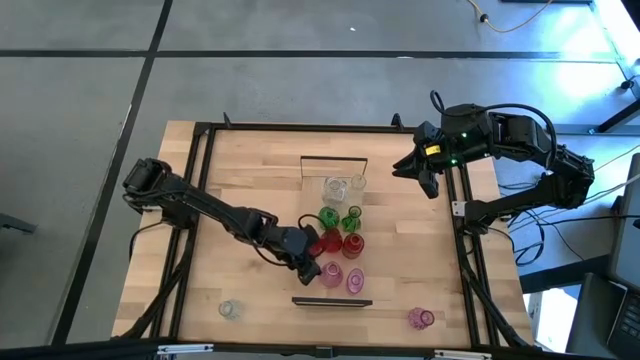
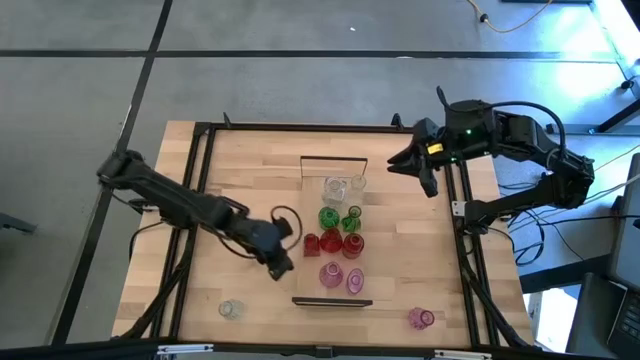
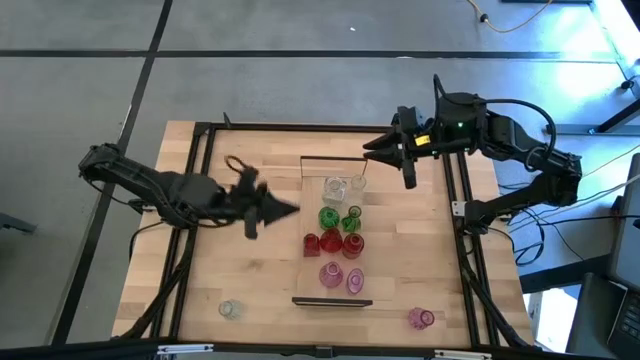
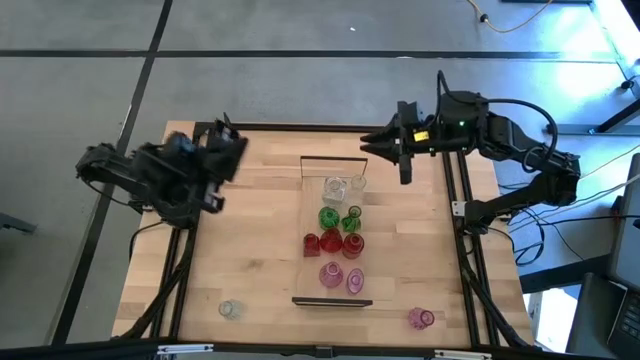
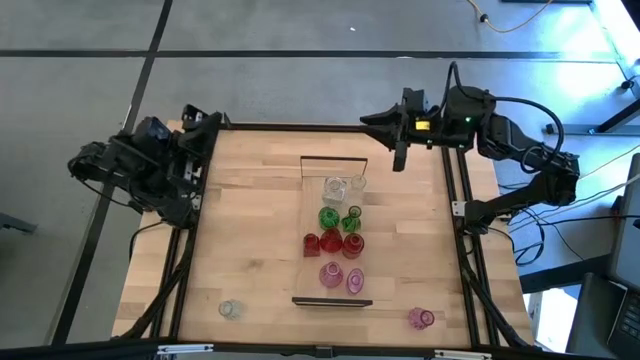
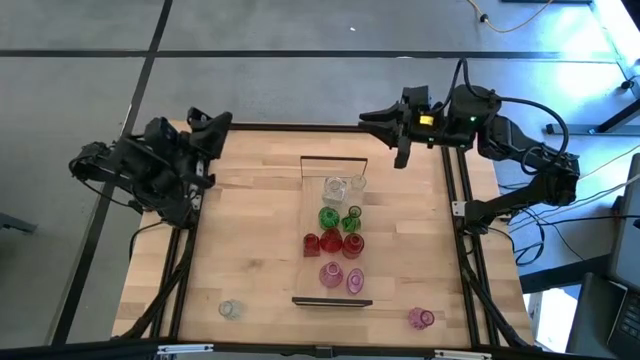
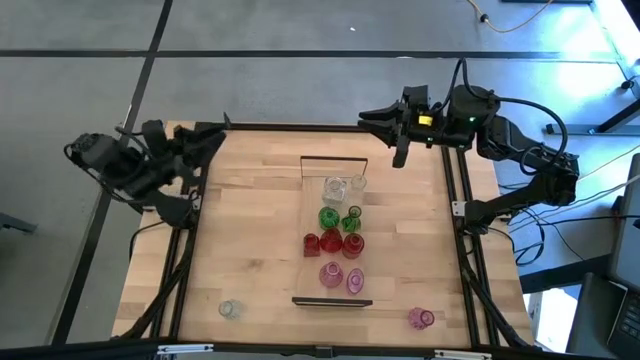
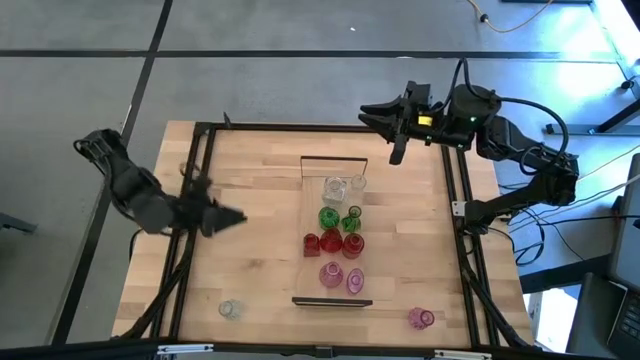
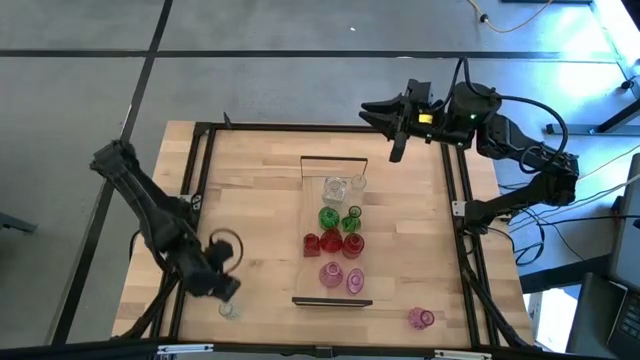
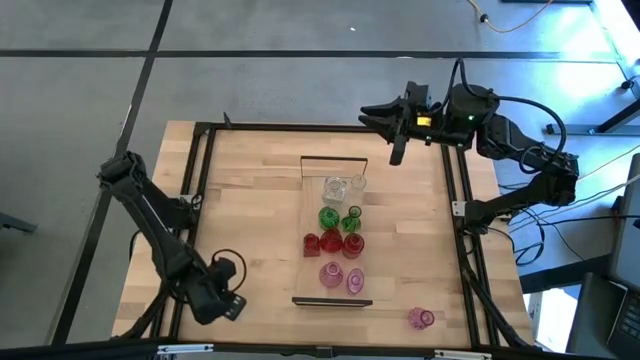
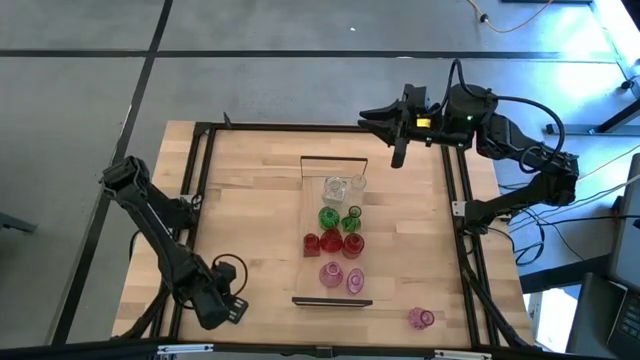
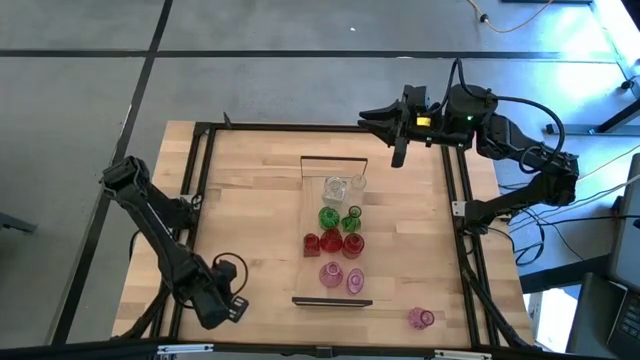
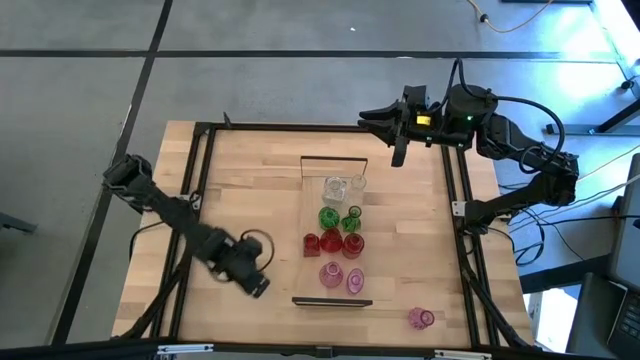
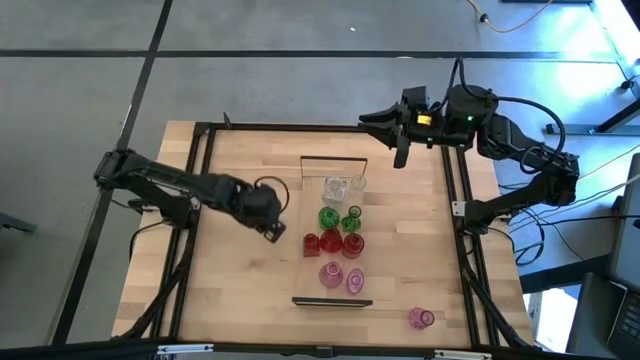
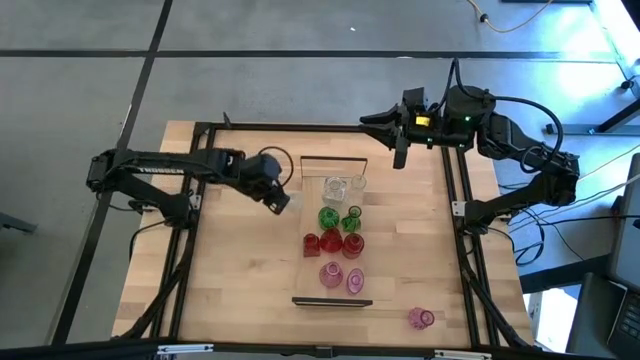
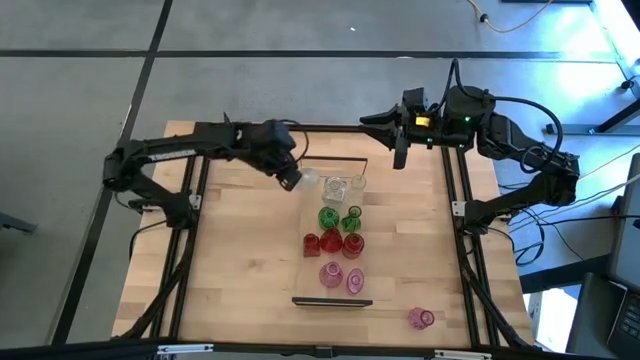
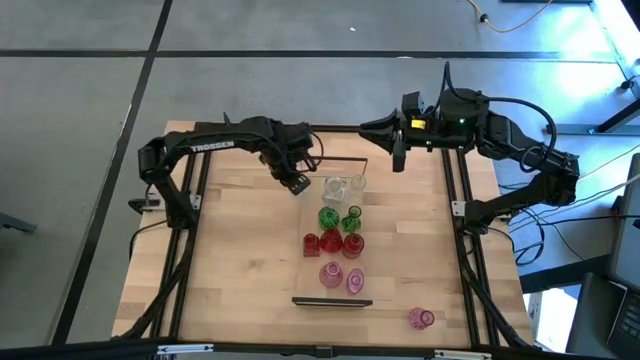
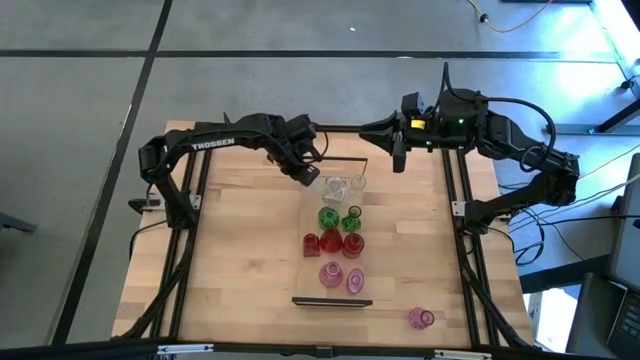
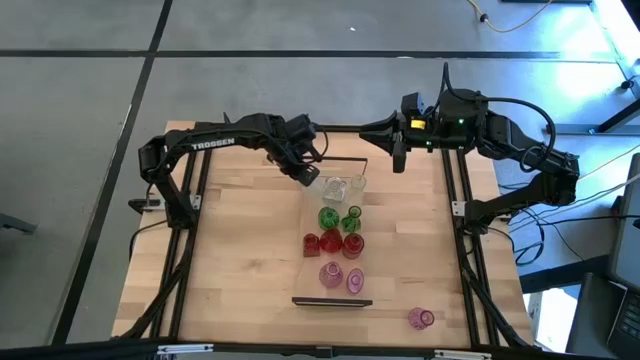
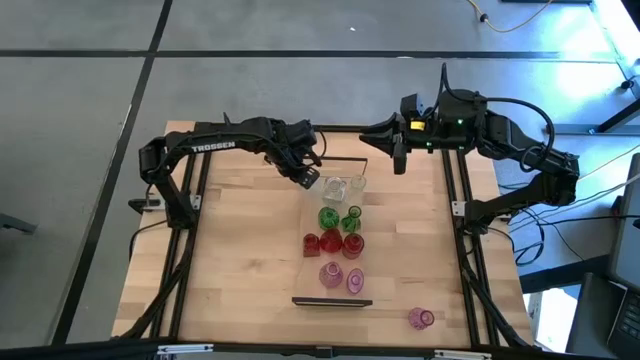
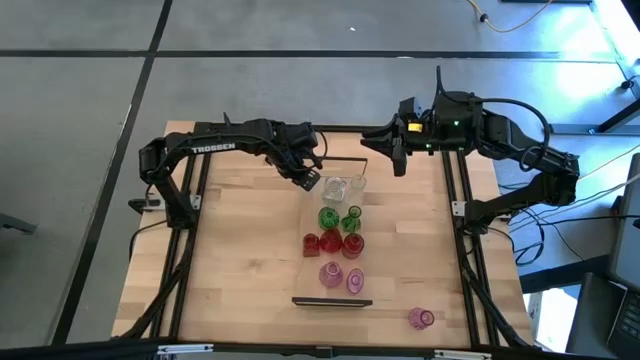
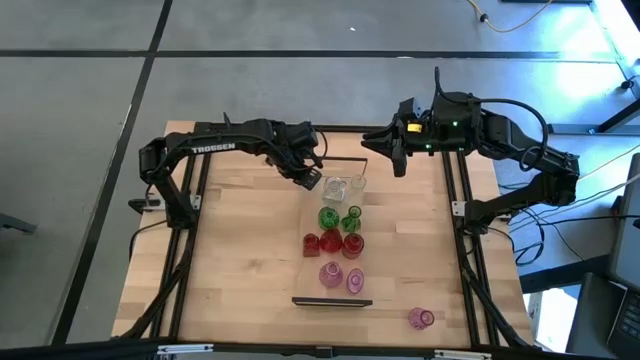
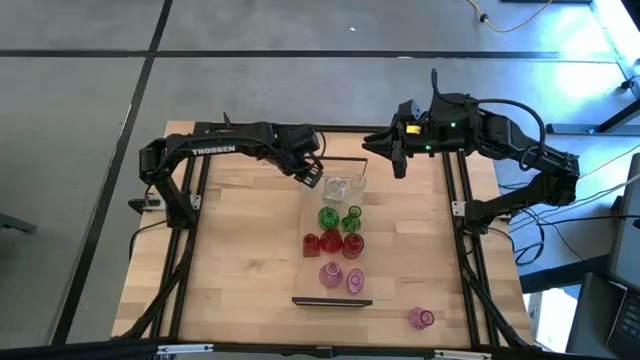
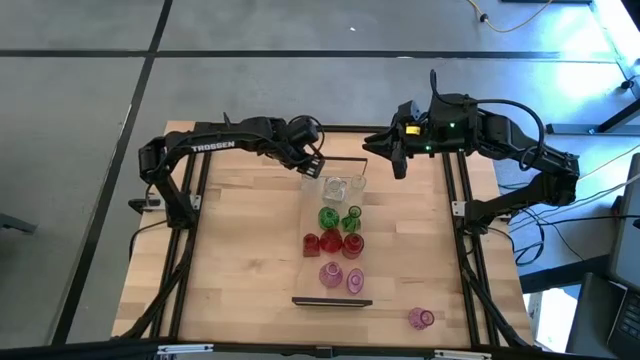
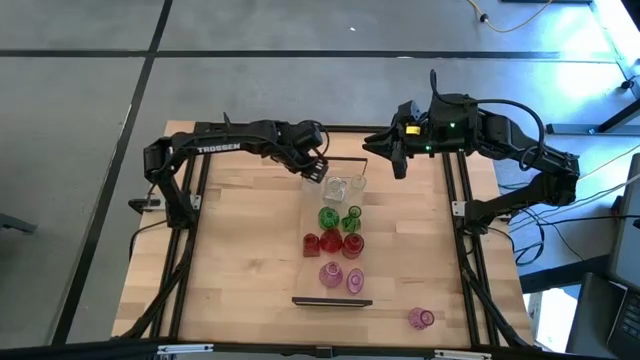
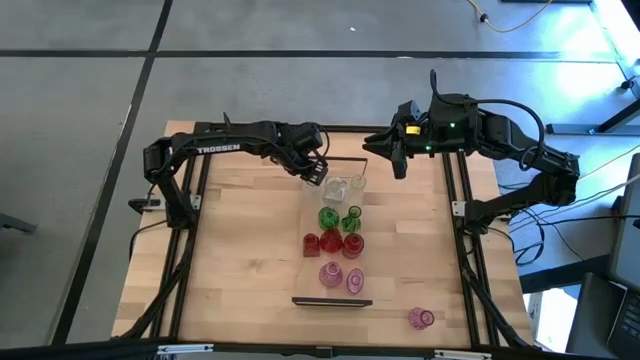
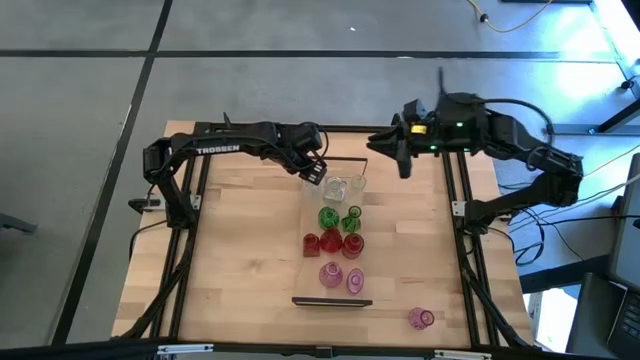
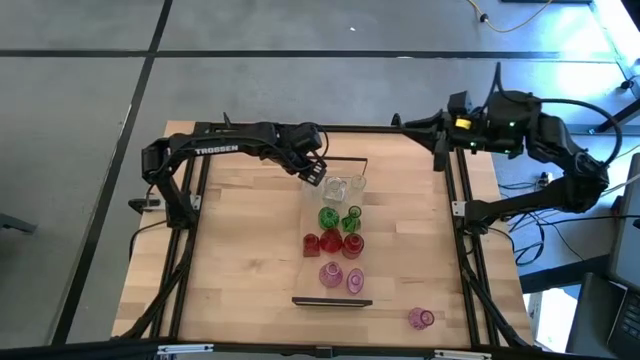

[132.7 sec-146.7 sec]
Task: sort vases onto shelf
Put the transparent vase aligned with the other transparent vases on the shelf

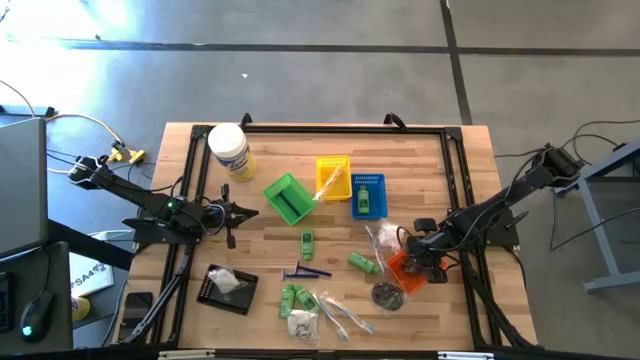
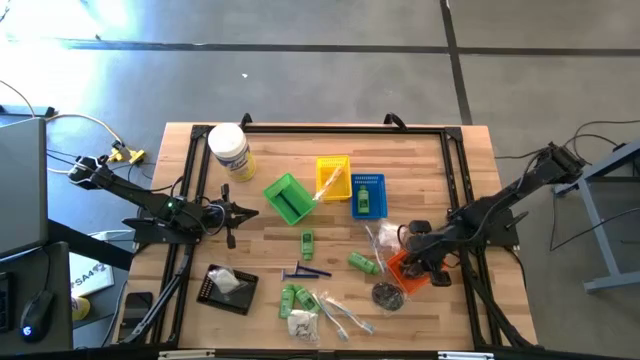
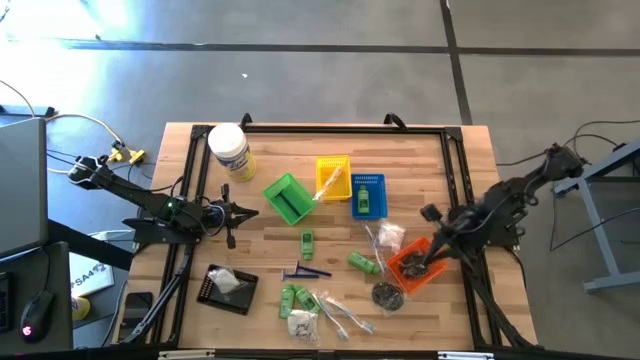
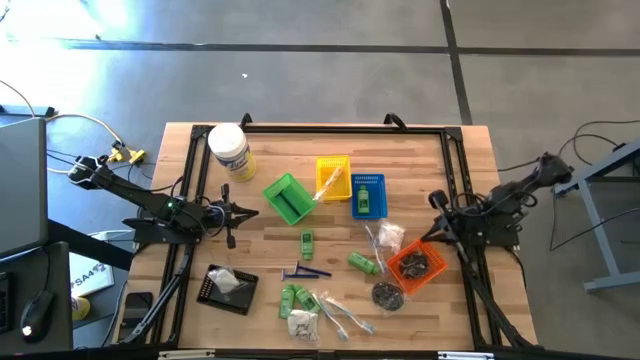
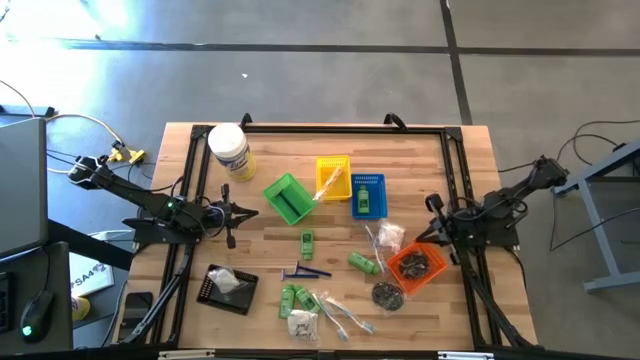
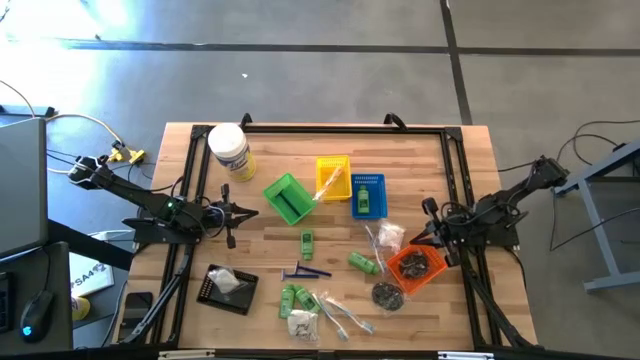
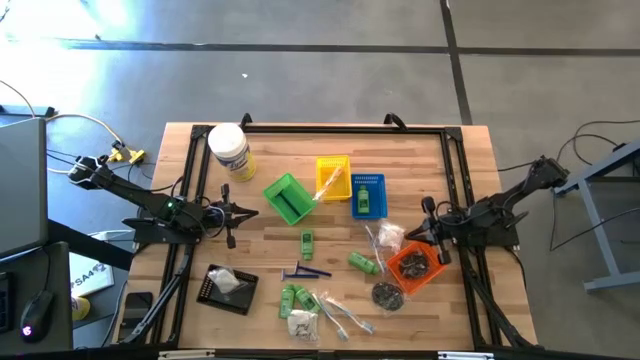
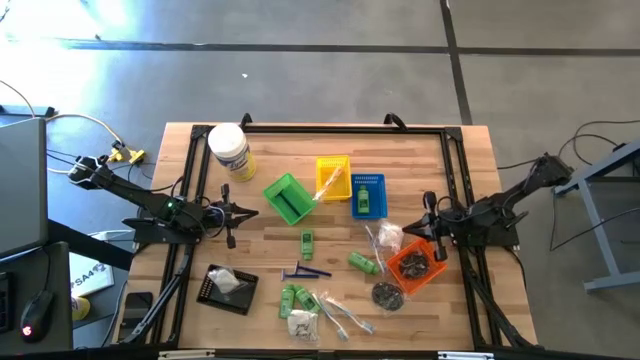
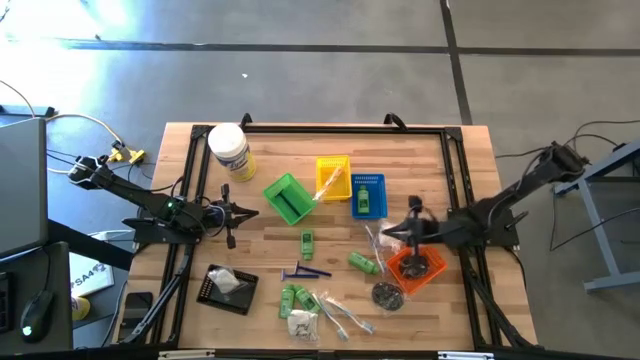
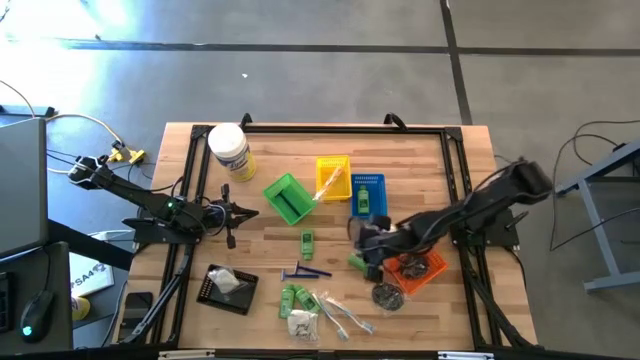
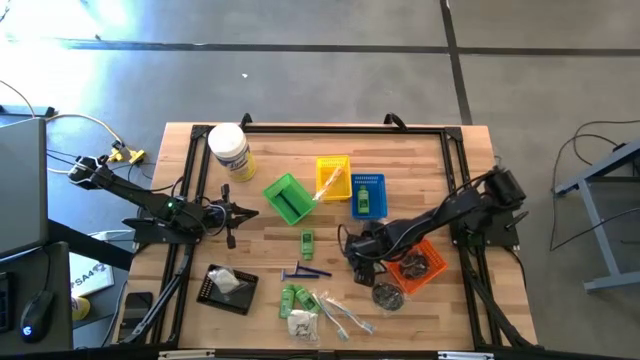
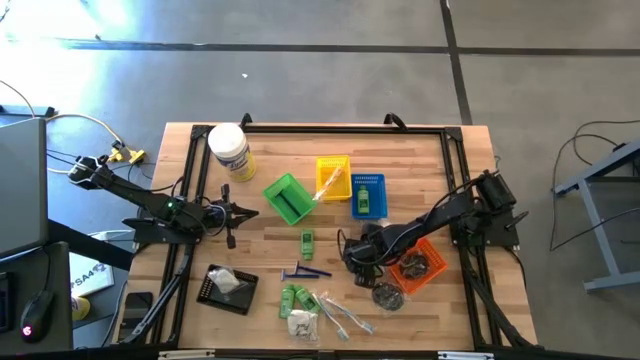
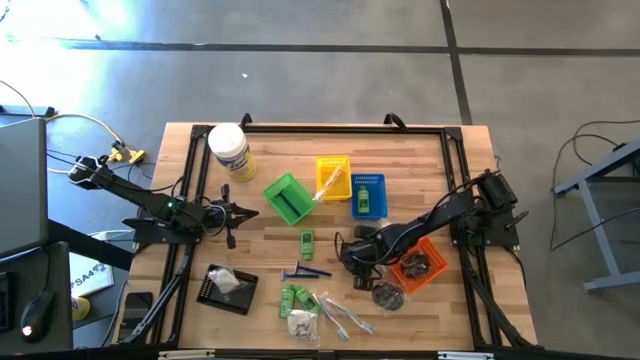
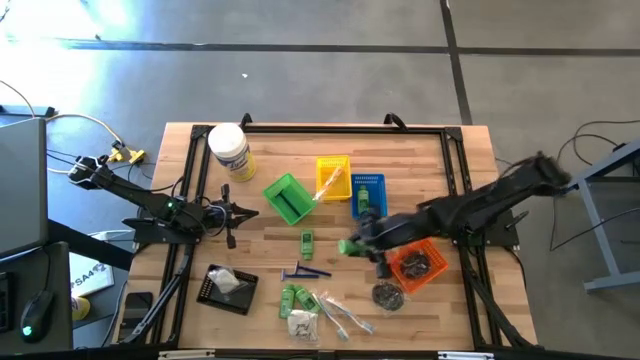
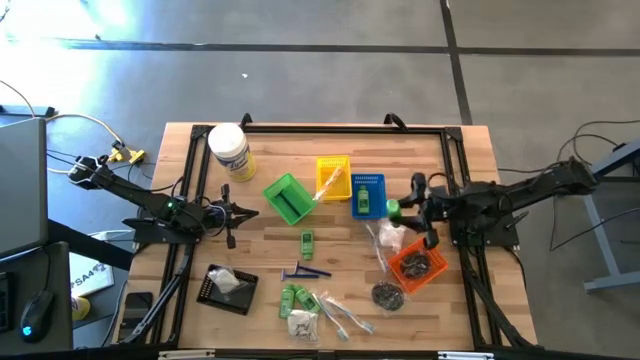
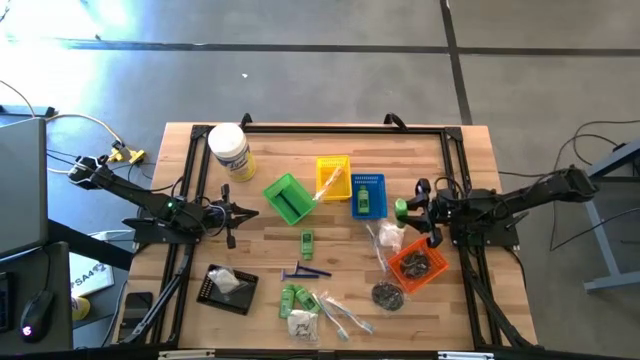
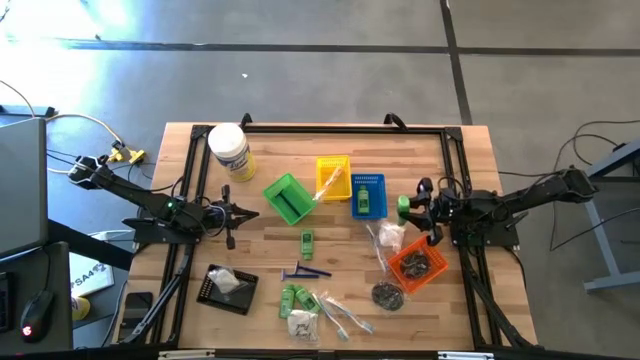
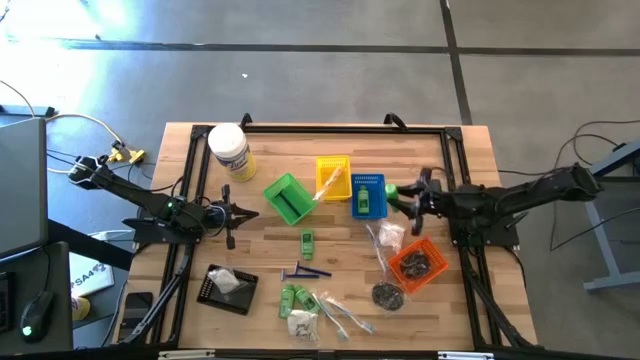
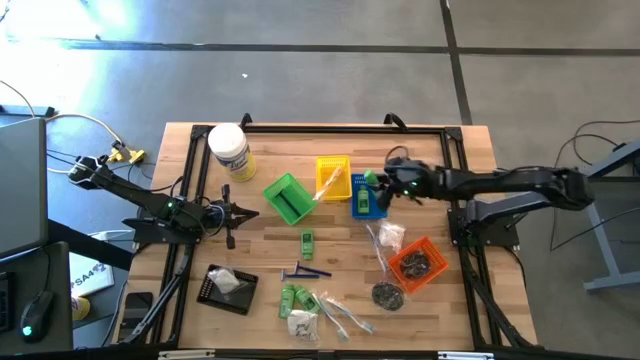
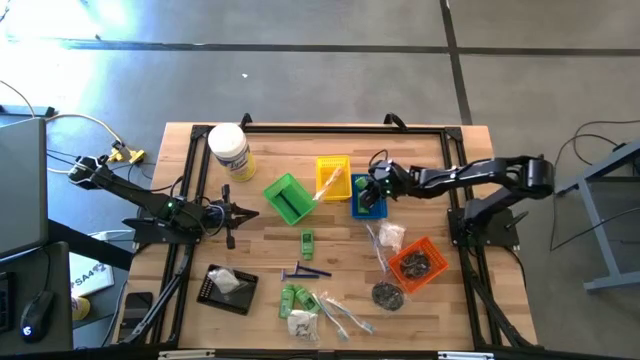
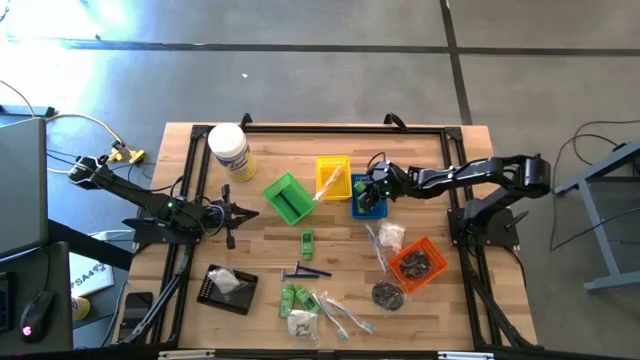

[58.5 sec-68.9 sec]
Task: Pick & Place Travel size toiletries
Put the green shampoo into the blue basket
